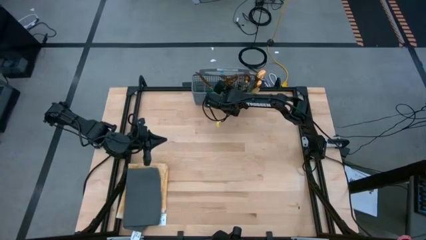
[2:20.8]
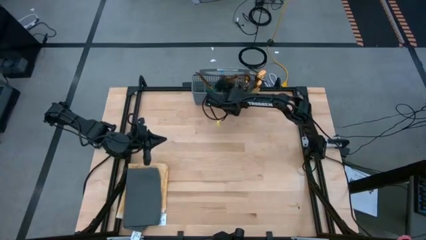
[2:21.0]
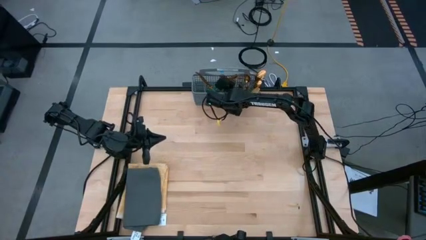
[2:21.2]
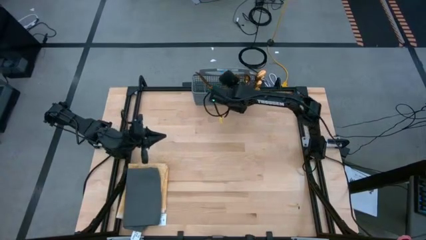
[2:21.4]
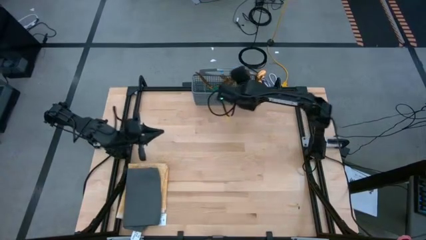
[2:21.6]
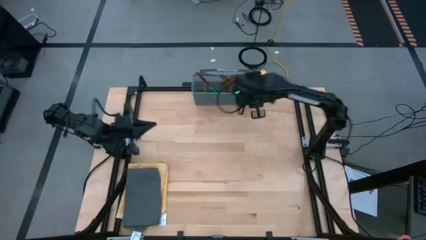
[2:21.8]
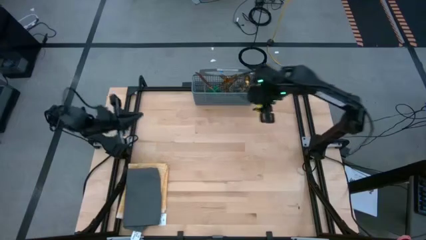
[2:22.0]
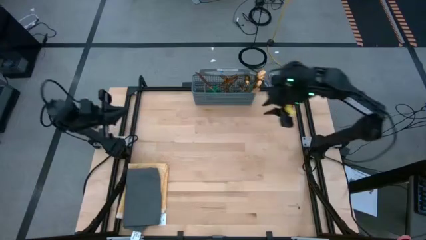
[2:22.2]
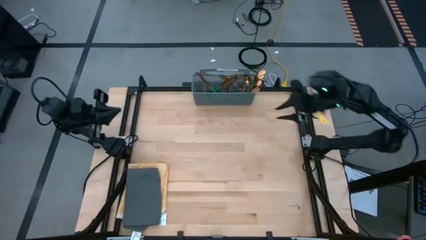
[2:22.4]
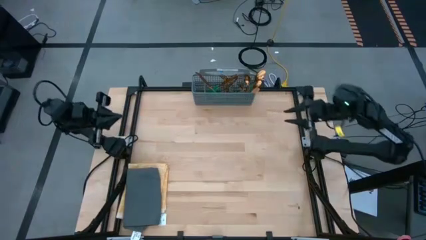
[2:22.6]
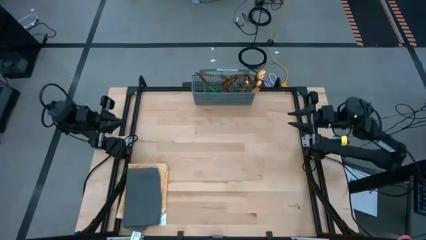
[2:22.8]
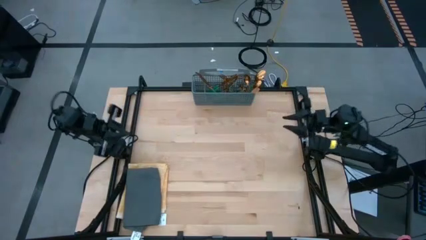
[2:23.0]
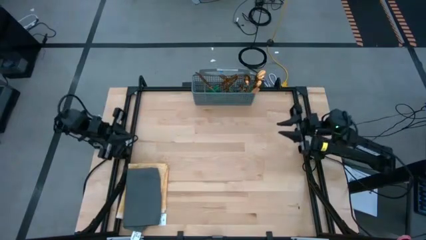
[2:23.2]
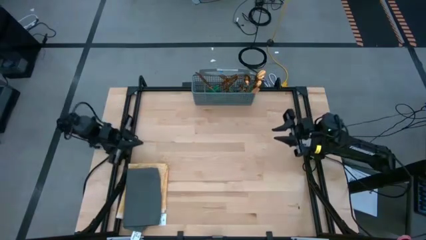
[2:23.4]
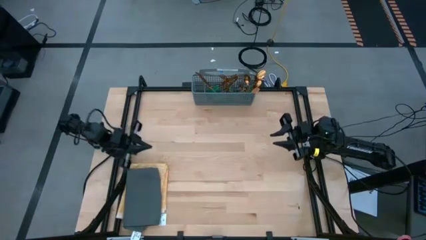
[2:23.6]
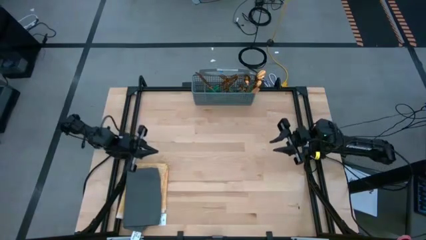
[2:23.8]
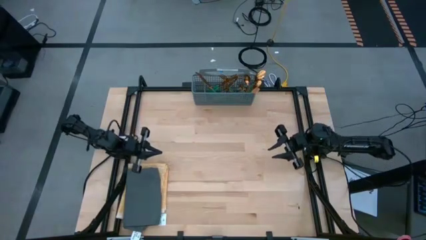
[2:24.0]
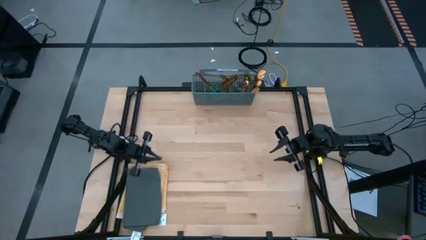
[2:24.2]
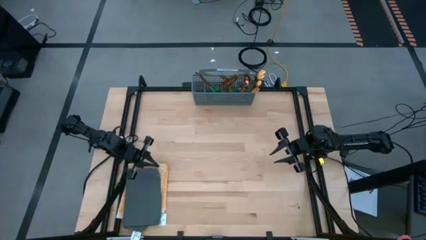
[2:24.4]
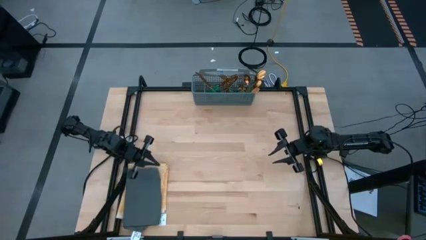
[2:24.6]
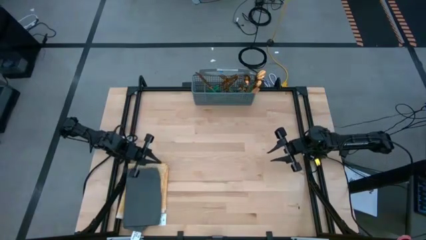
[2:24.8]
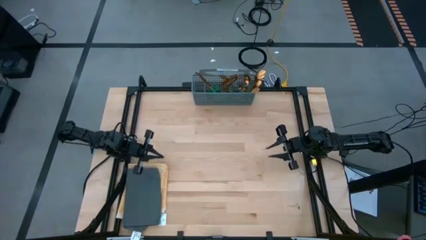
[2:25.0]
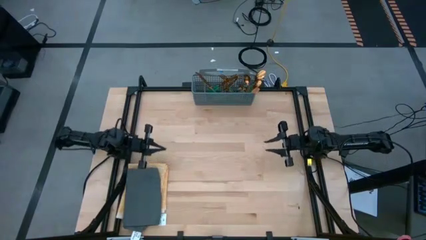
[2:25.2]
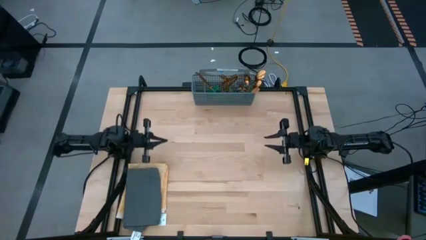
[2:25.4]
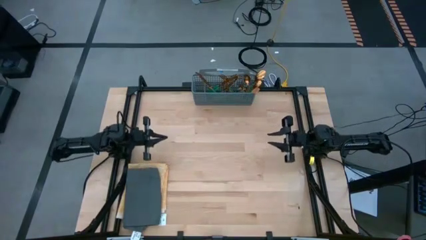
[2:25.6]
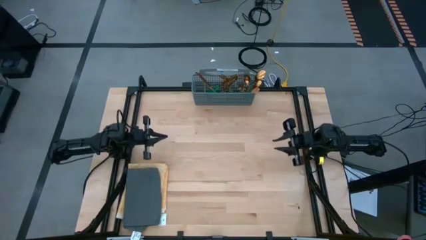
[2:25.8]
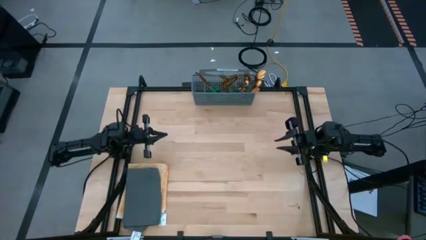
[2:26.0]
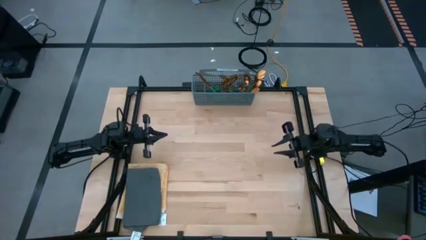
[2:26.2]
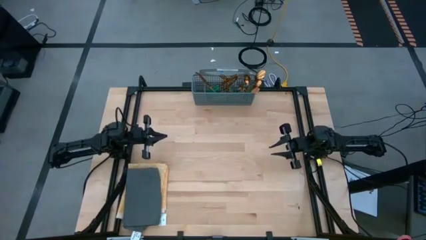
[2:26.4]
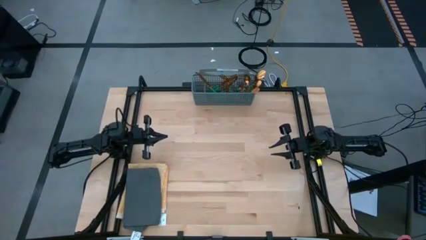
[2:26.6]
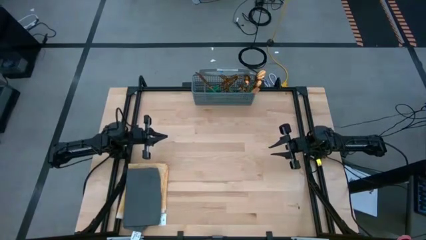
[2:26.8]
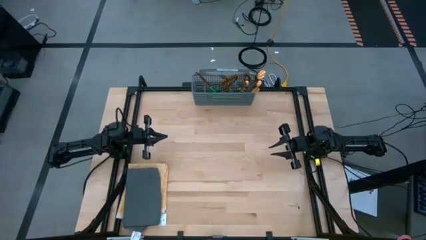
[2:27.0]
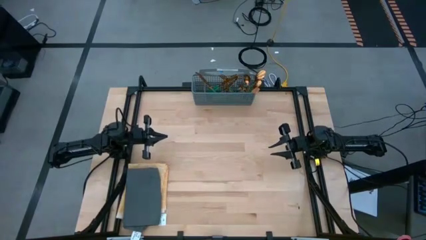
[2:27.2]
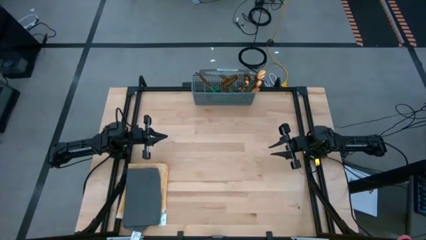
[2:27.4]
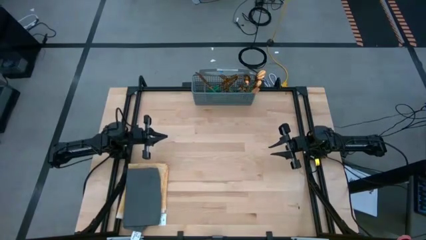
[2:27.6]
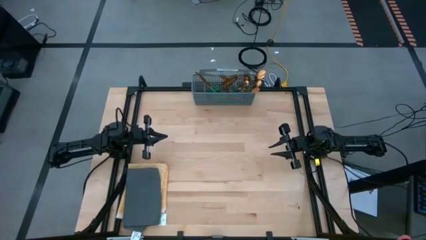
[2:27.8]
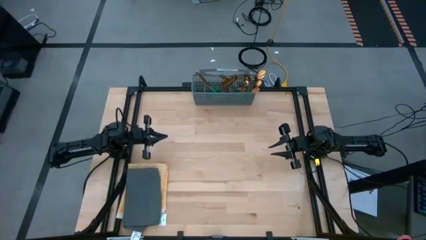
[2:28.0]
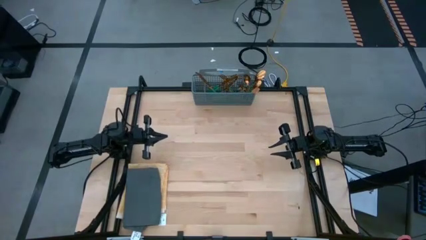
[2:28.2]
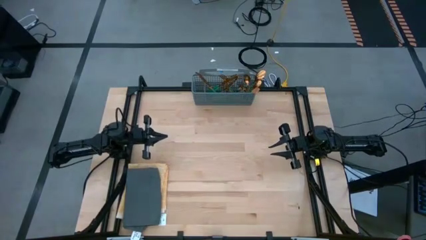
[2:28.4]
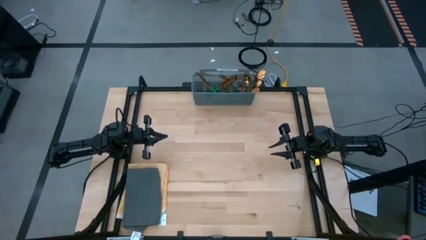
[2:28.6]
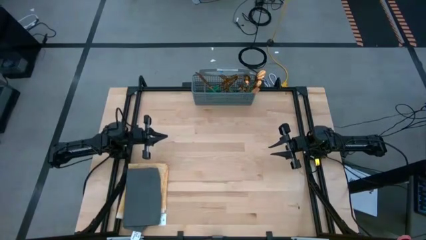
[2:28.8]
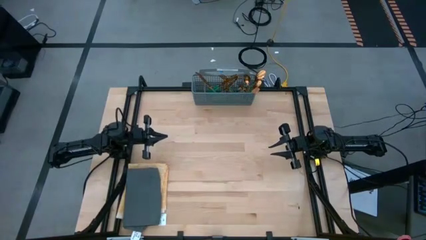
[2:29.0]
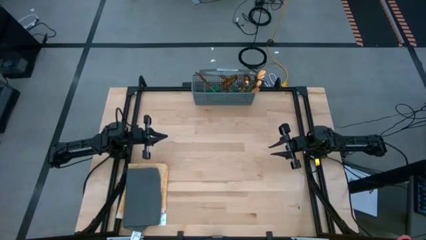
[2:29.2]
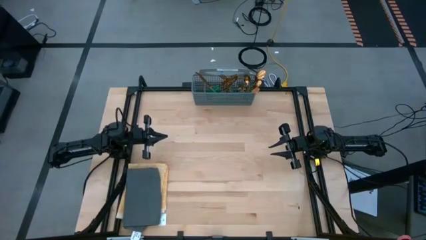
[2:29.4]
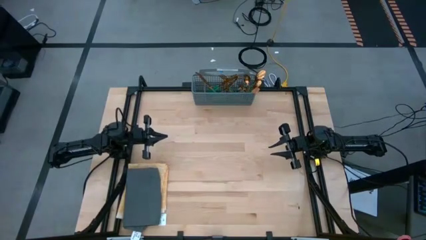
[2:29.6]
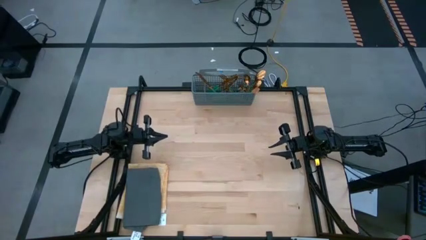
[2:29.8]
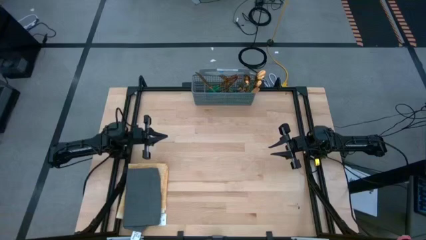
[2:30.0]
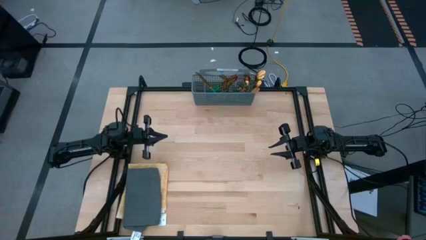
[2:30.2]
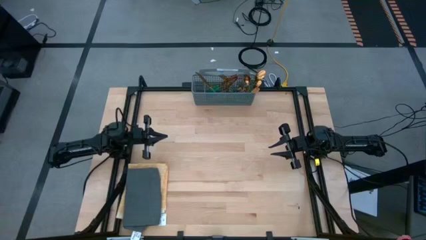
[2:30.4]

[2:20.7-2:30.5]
Task: Sort silverware
Return to Home Position

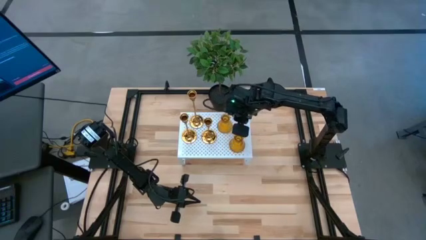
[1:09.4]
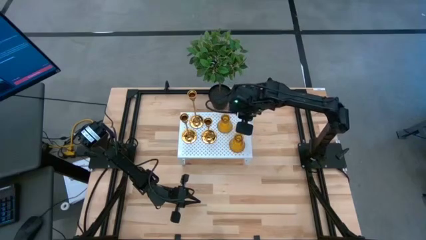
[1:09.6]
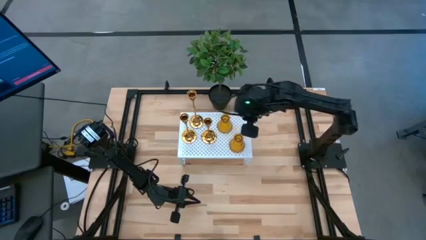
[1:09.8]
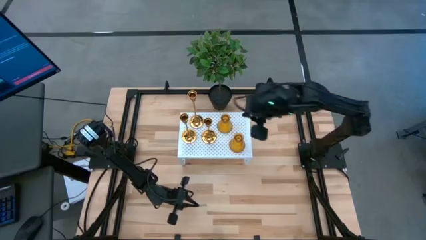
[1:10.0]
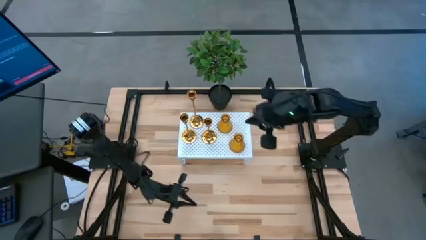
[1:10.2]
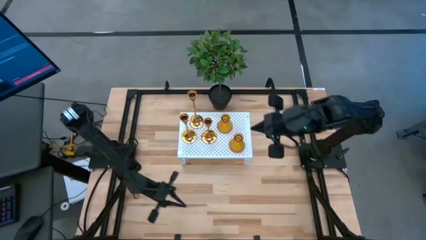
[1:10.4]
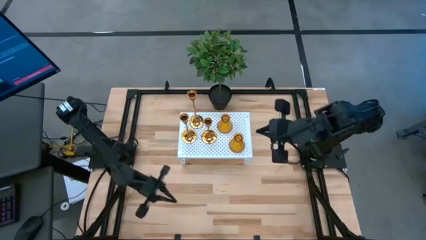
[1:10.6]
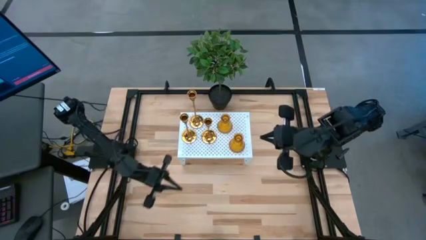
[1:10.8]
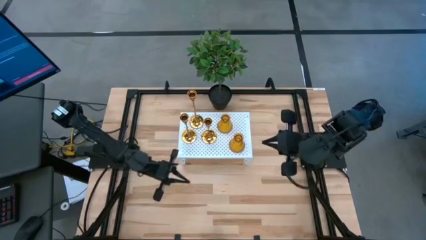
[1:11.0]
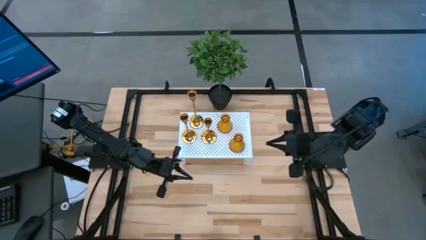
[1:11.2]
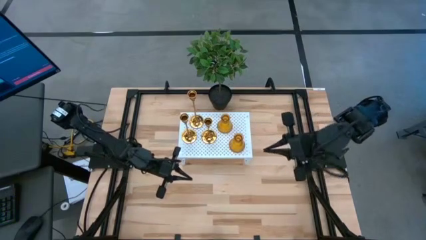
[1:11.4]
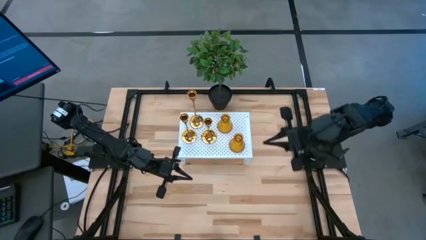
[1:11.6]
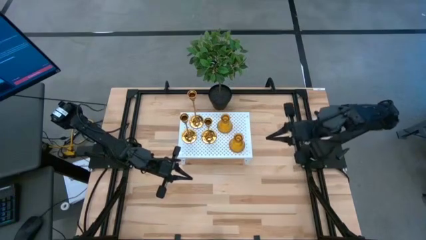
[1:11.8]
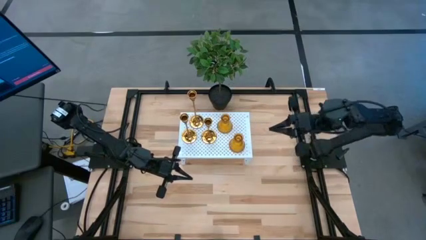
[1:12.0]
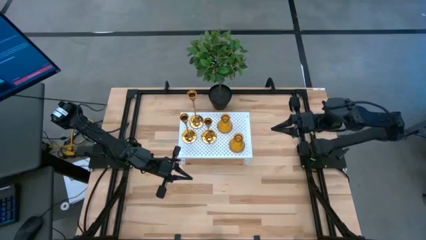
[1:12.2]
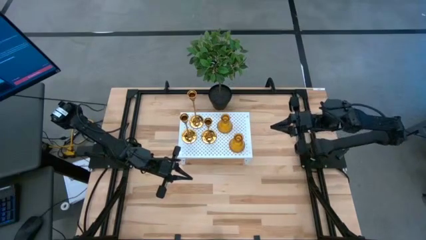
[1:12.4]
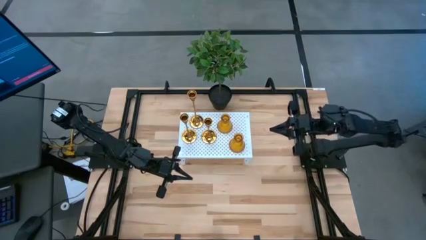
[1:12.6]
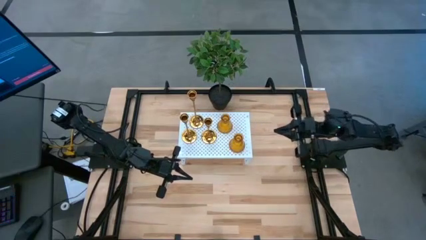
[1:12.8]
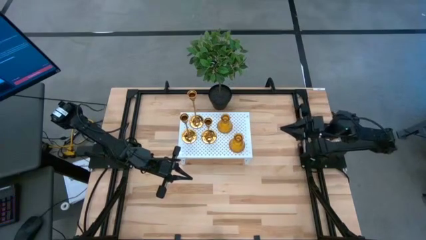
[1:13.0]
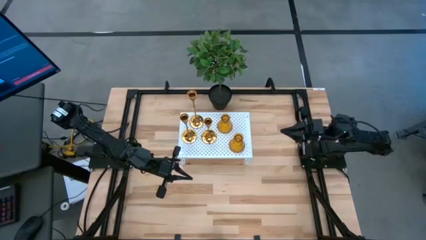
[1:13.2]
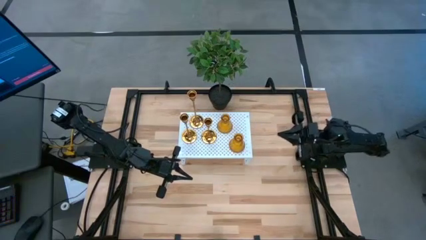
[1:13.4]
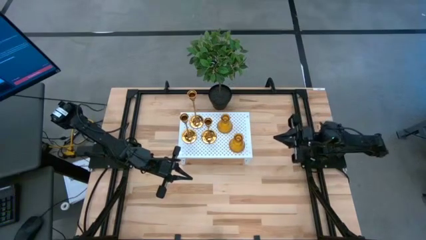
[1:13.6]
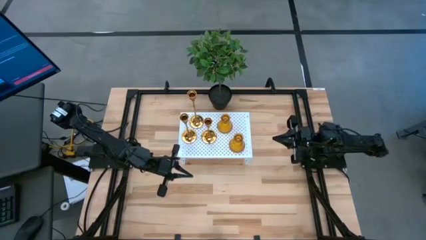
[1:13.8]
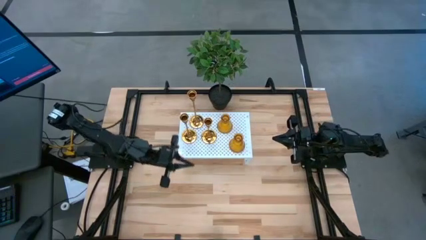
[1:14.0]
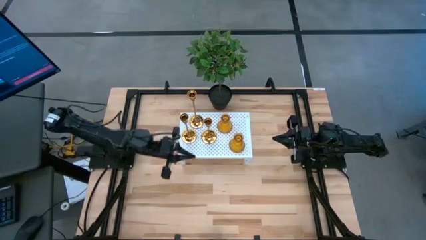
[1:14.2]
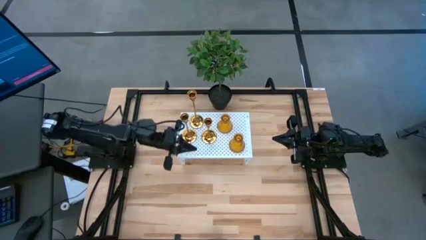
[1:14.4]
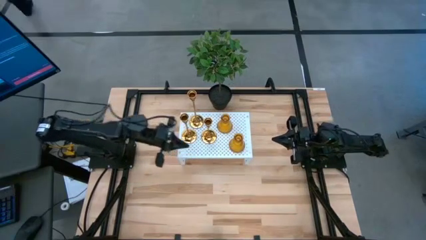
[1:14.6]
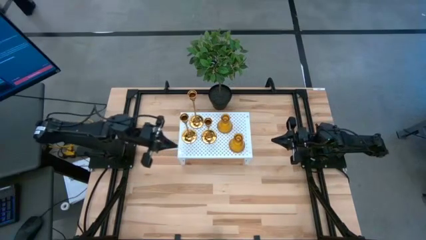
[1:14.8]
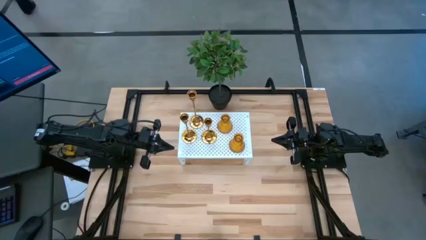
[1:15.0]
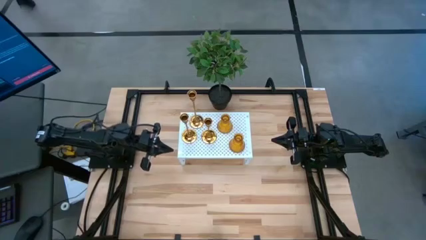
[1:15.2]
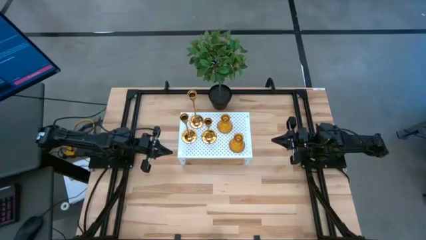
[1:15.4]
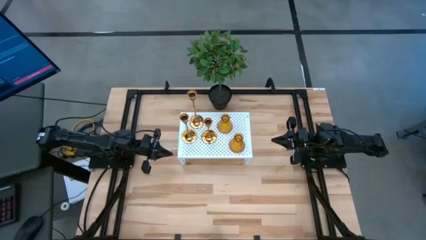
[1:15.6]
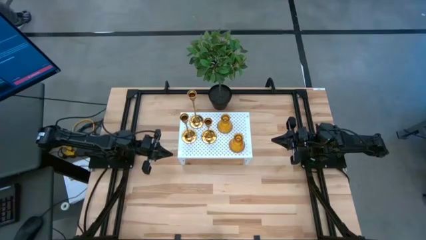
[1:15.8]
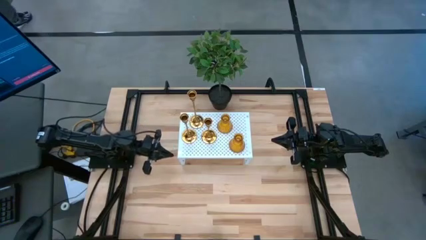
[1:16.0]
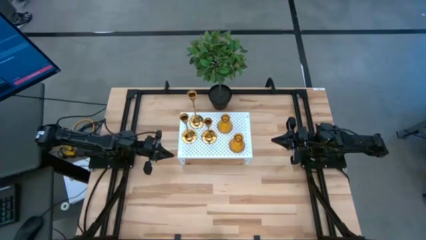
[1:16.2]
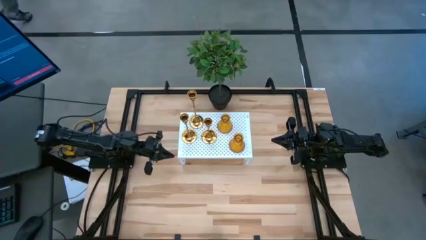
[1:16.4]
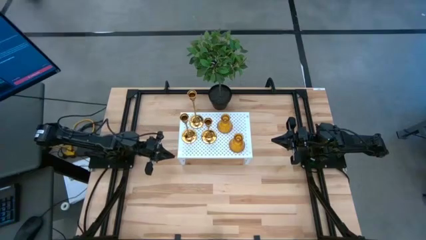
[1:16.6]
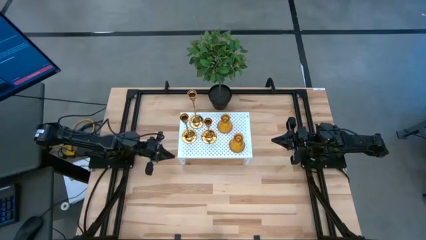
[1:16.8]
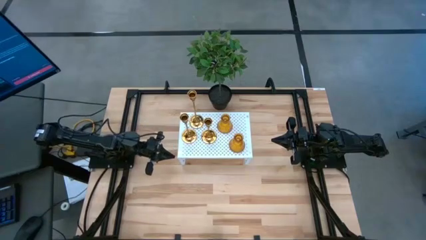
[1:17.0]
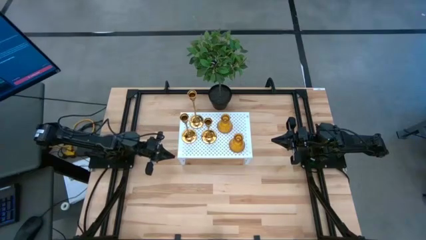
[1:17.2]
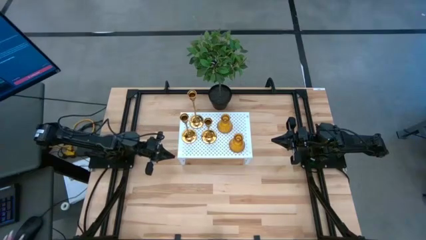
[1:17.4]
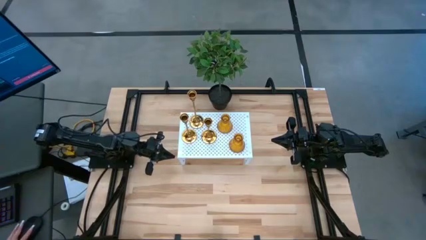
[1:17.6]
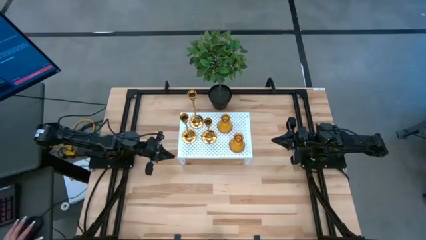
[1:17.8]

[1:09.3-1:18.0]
Task: Pick & Place candle stick holders
Return to Home Position
